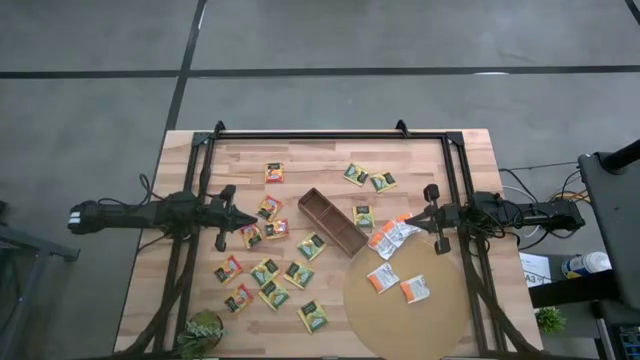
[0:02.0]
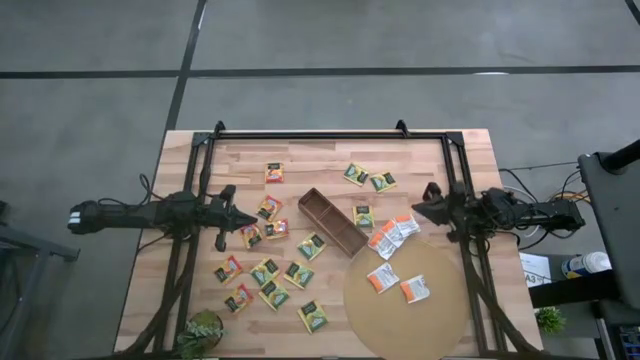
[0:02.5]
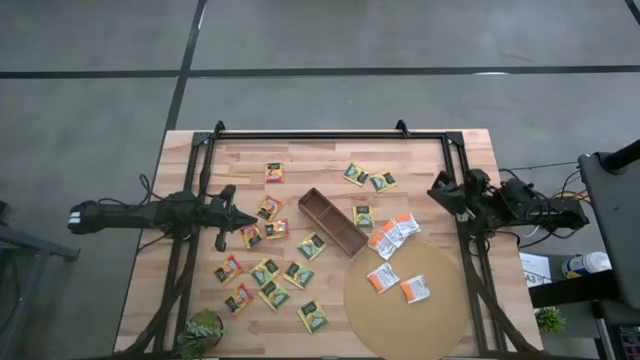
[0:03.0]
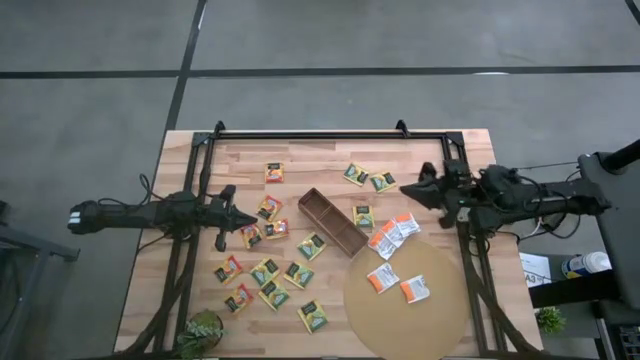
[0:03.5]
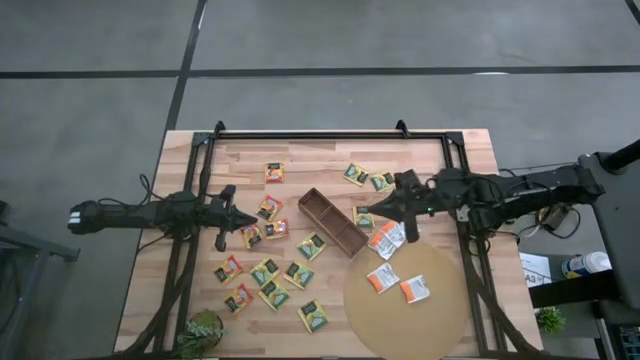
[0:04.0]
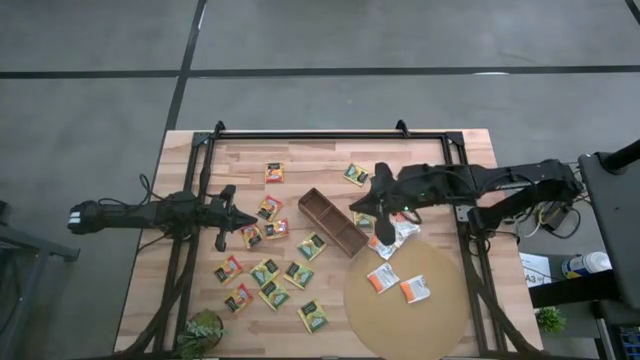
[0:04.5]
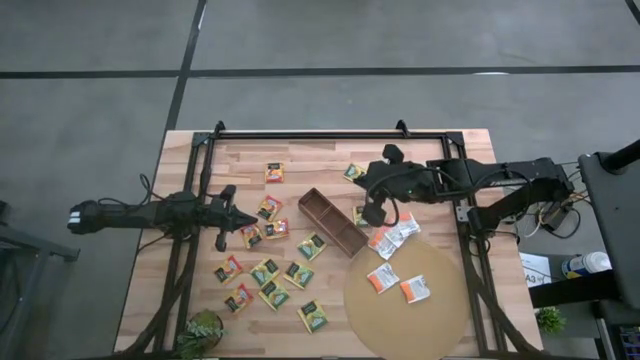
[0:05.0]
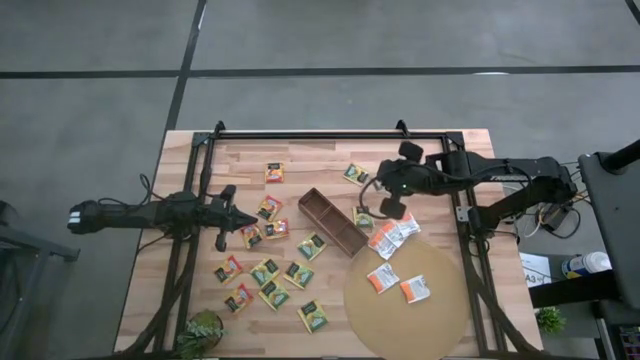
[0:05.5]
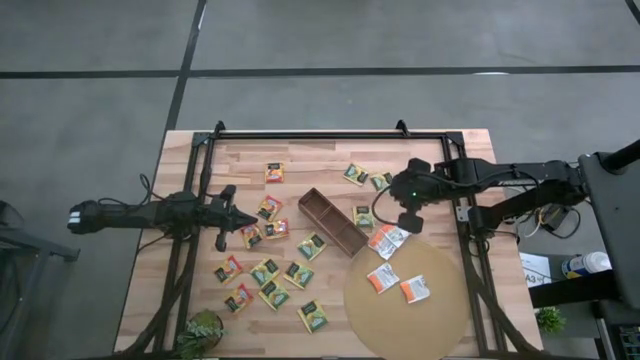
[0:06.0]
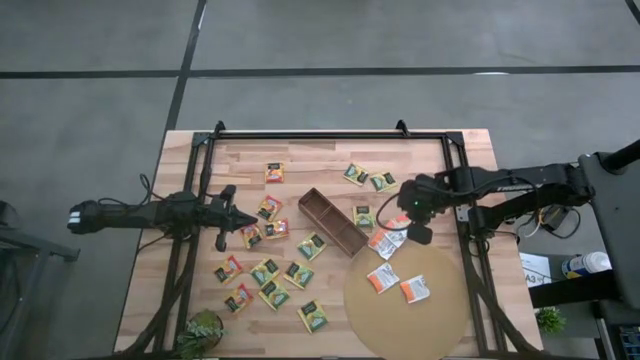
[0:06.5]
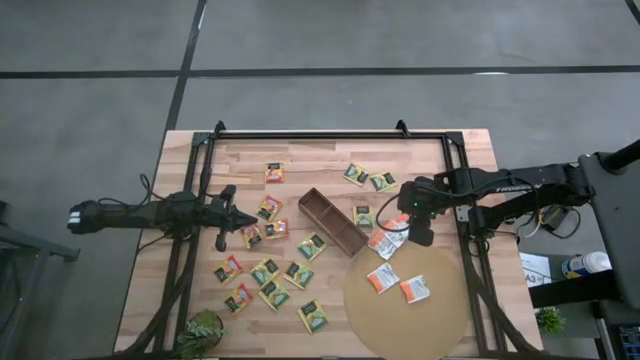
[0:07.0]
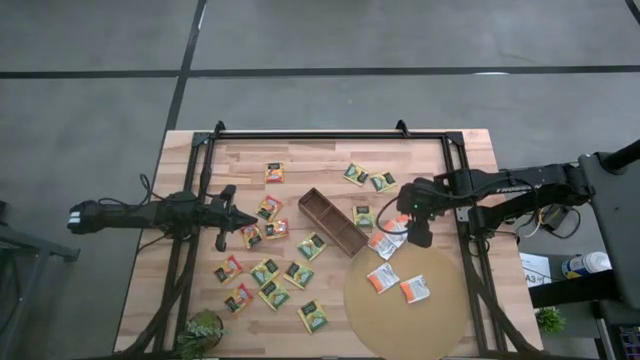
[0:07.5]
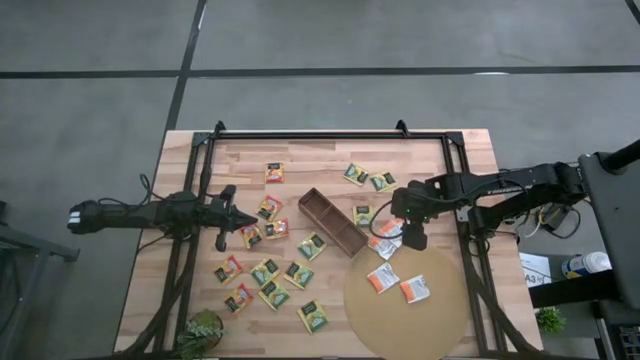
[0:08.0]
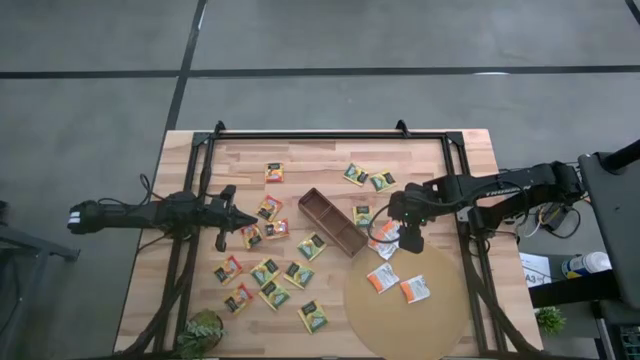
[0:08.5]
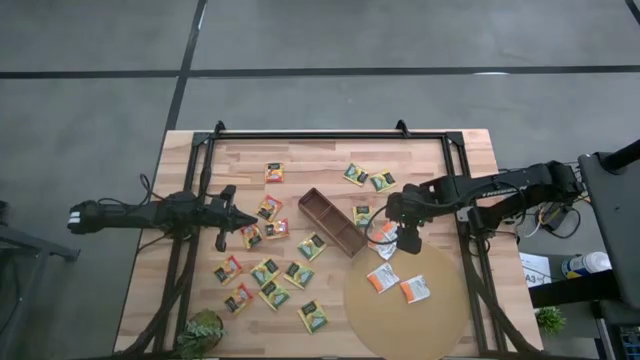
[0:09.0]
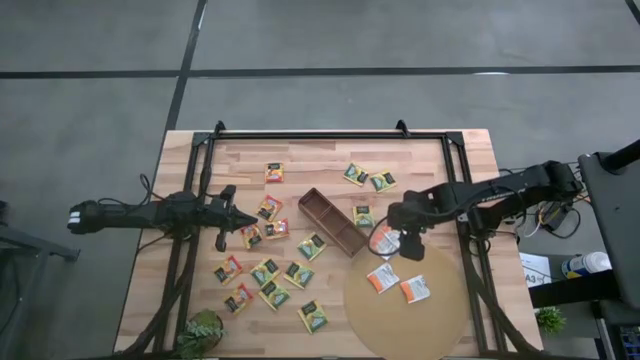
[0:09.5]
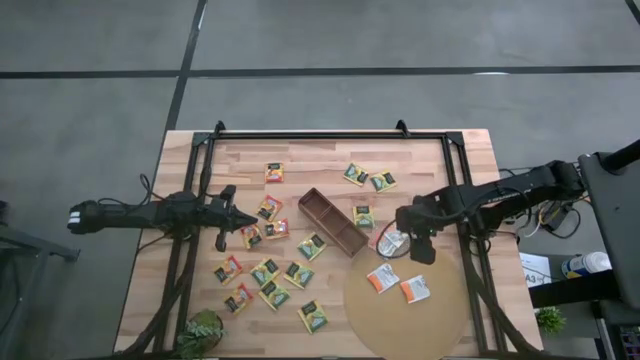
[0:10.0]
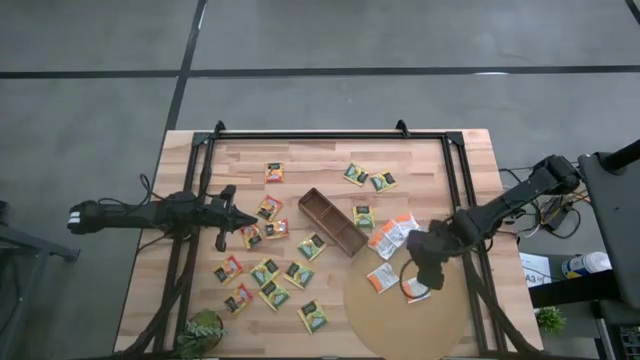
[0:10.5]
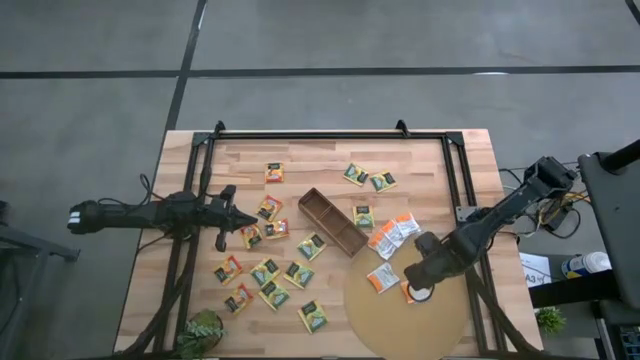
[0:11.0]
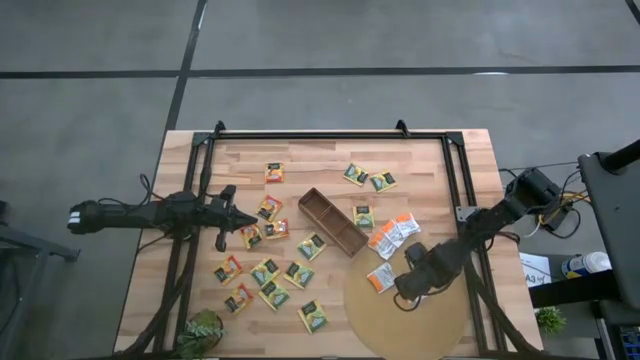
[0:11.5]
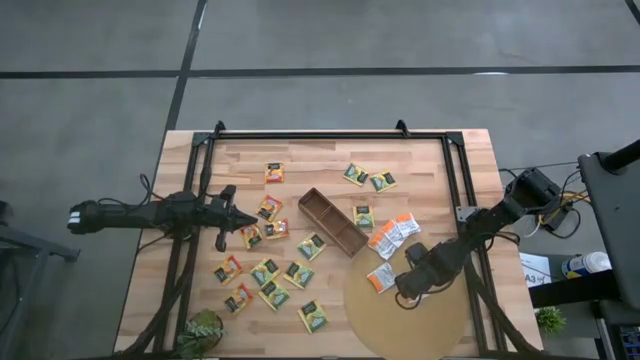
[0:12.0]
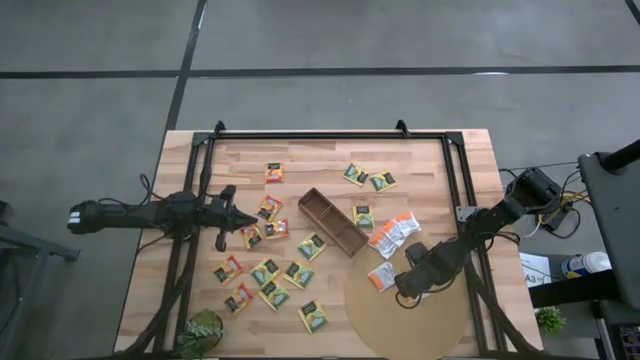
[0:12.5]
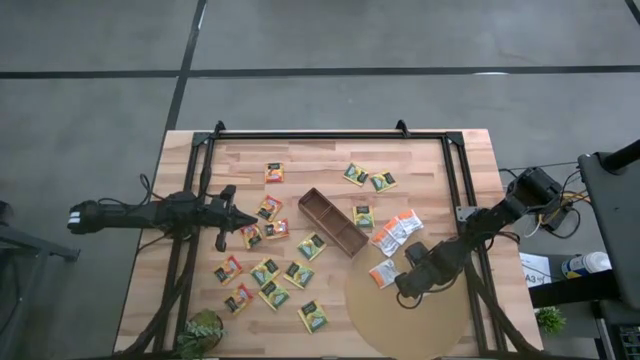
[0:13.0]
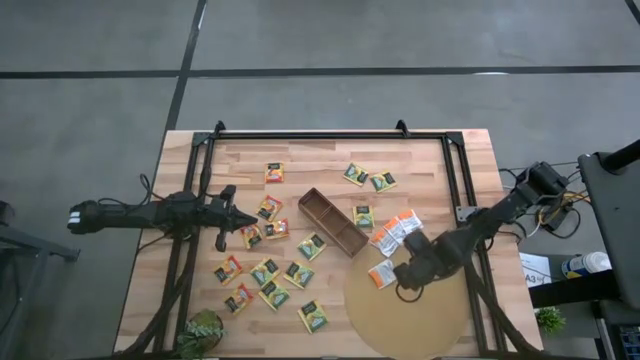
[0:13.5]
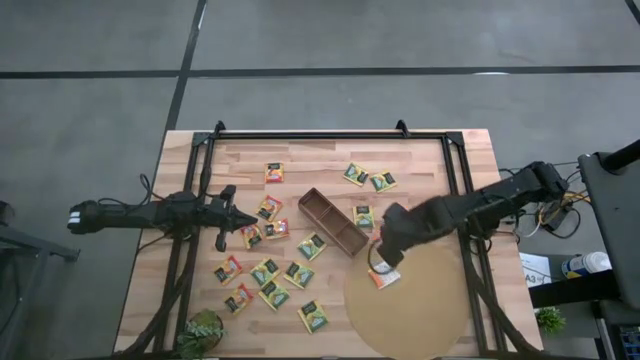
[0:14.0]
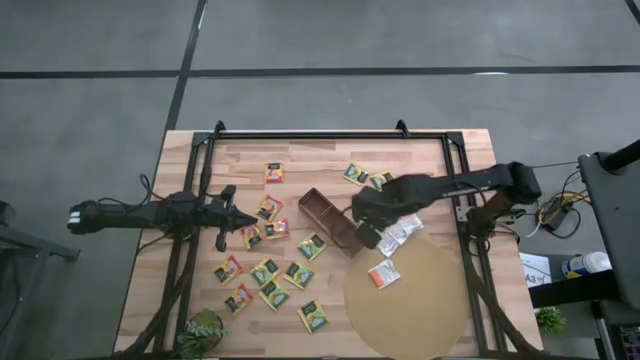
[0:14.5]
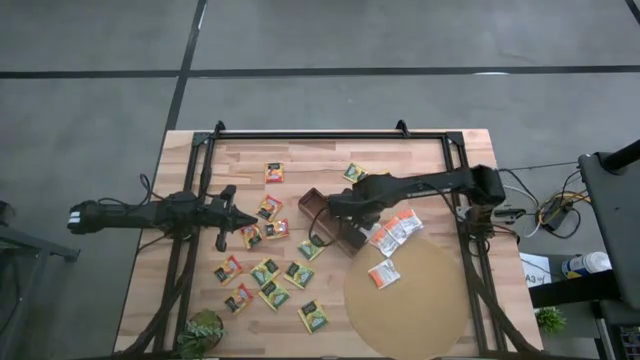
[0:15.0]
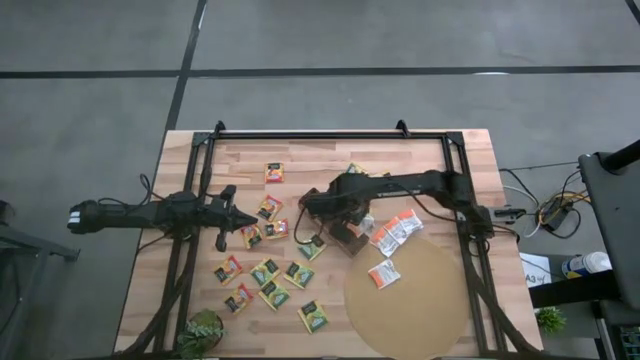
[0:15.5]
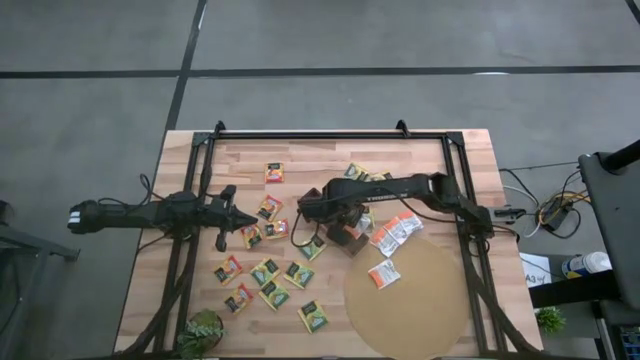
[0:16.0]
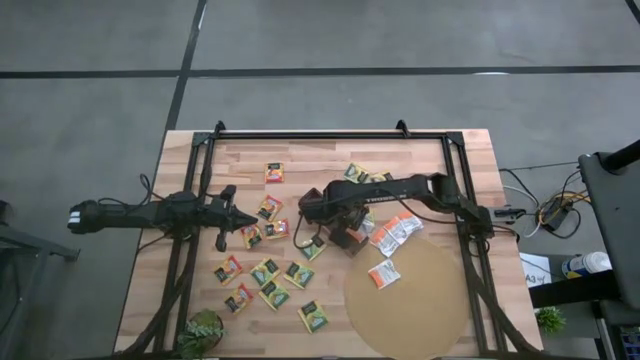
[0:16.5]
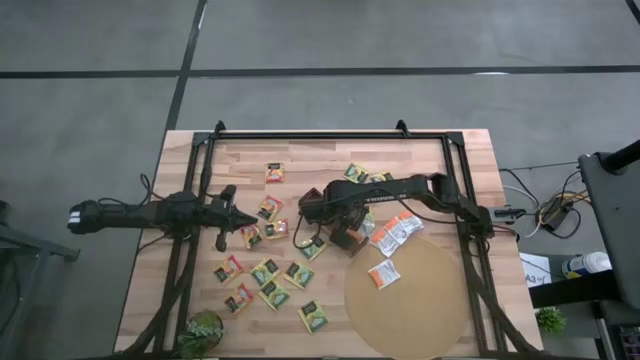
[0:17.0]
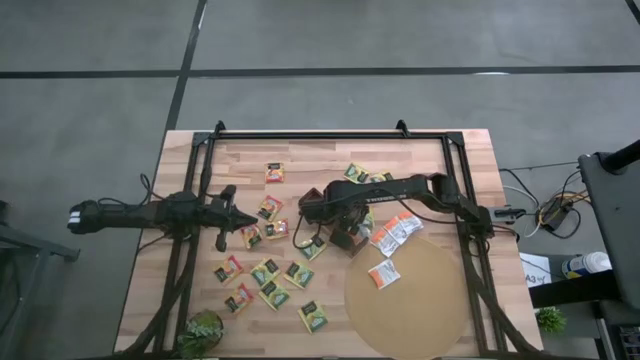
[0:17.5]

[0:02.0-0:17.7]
Task: Pick & Place Tea
Put the white tea bag into the right section of the wooden organizer

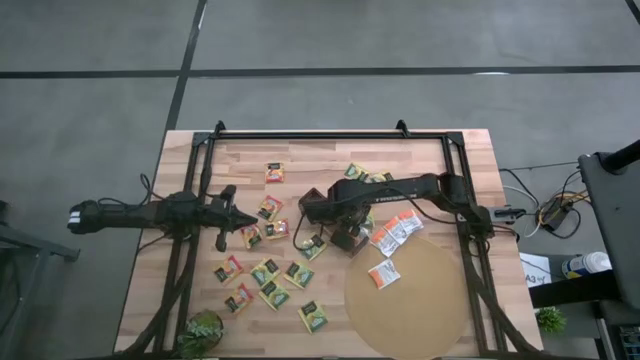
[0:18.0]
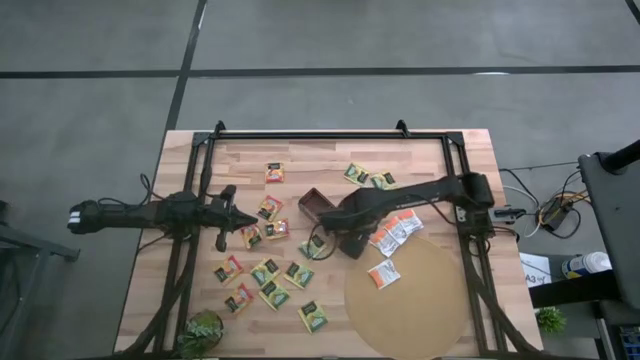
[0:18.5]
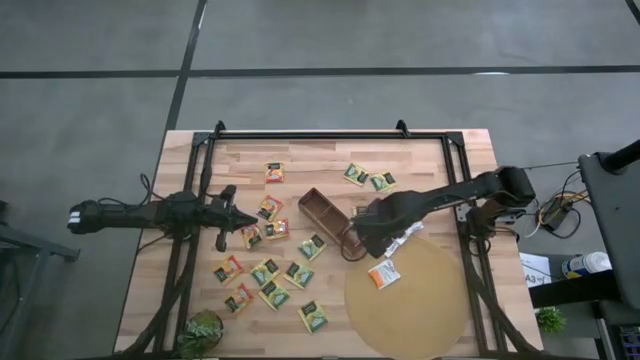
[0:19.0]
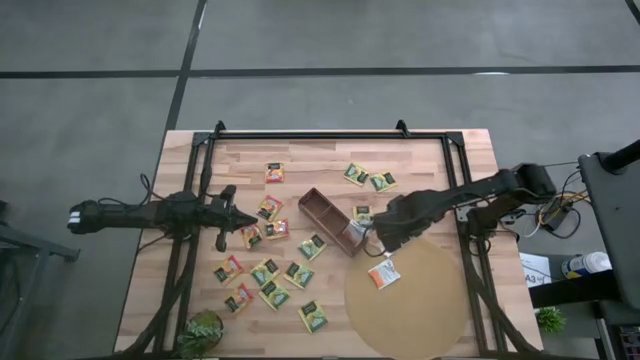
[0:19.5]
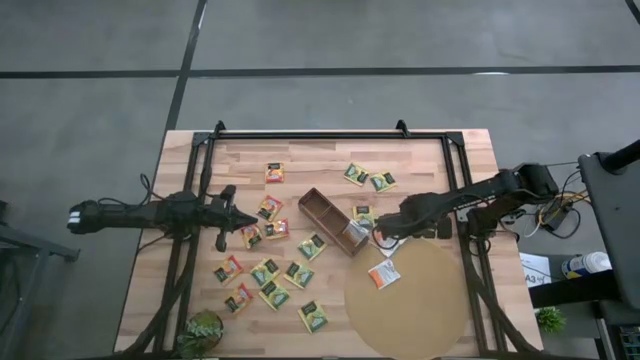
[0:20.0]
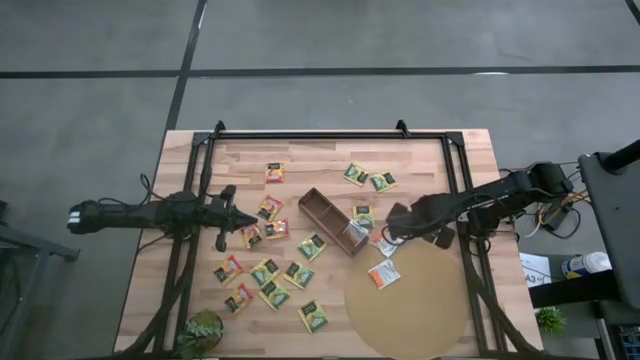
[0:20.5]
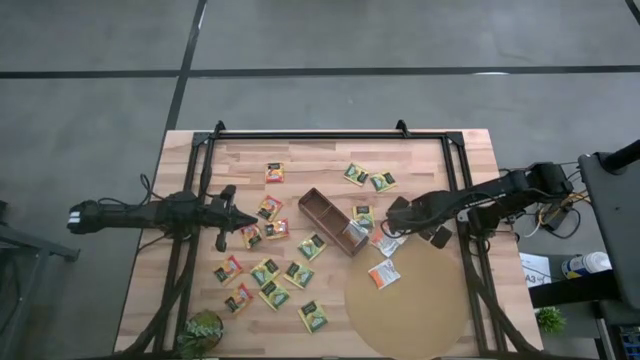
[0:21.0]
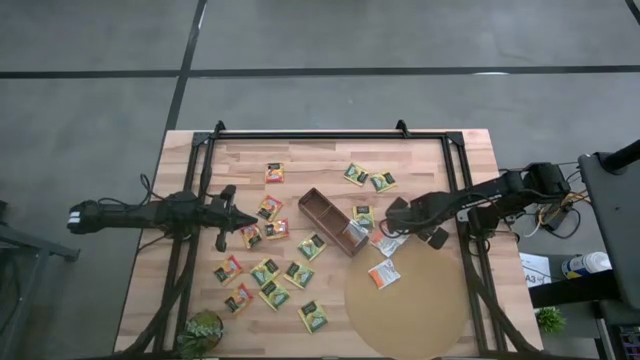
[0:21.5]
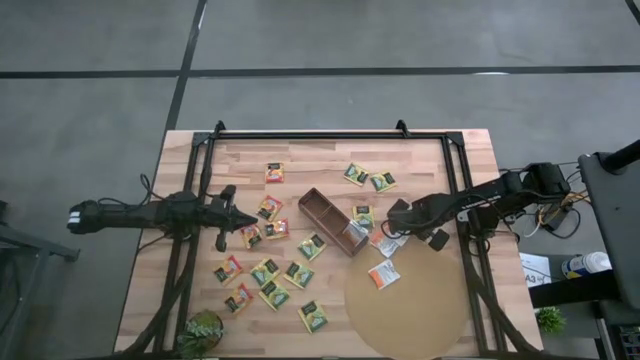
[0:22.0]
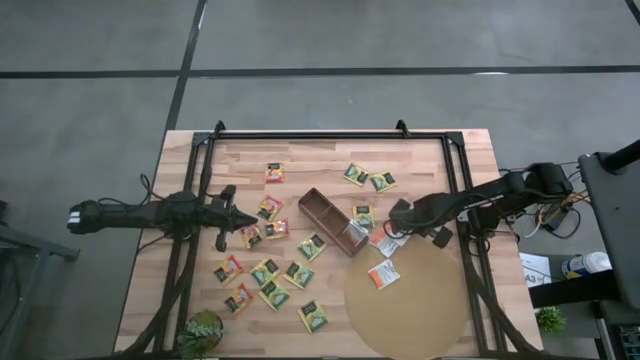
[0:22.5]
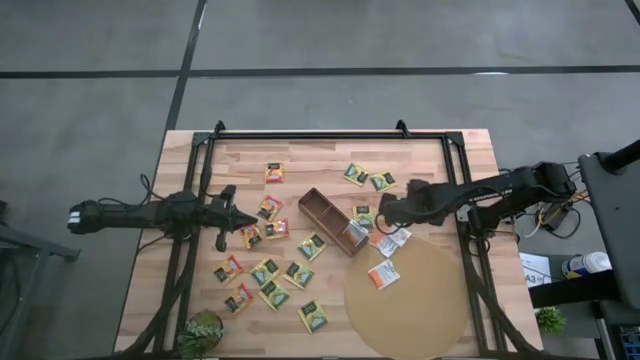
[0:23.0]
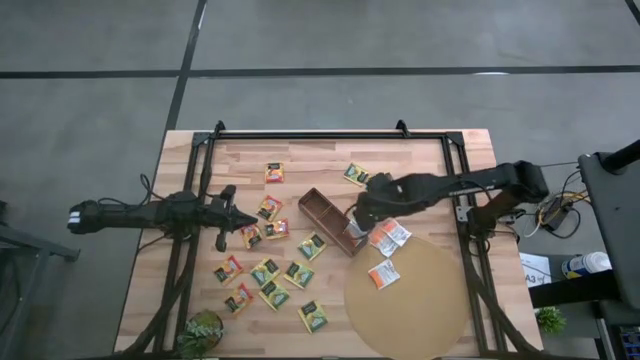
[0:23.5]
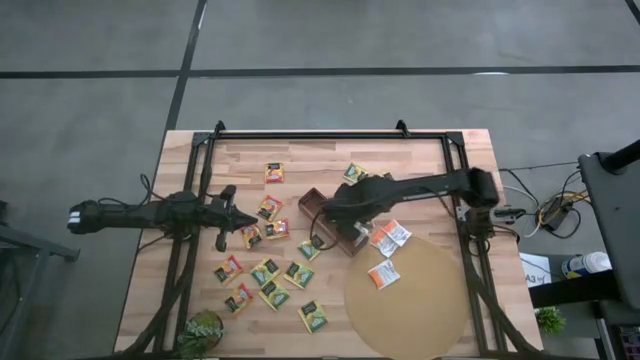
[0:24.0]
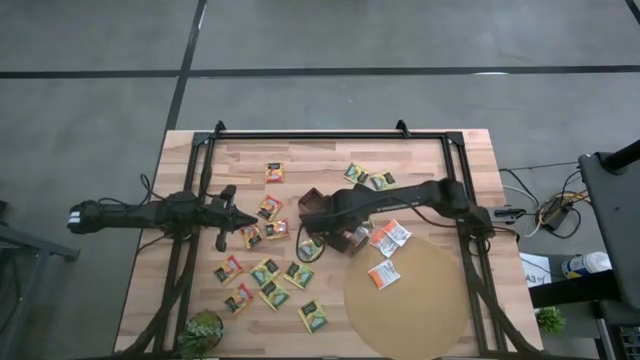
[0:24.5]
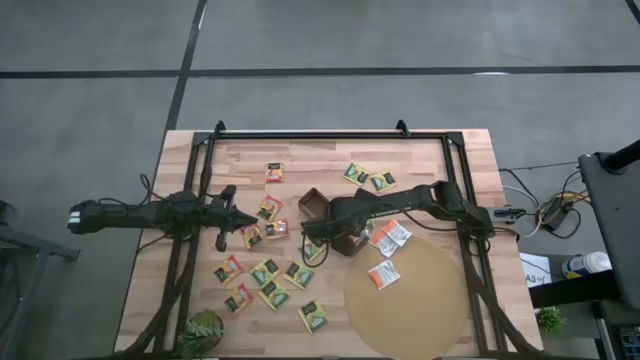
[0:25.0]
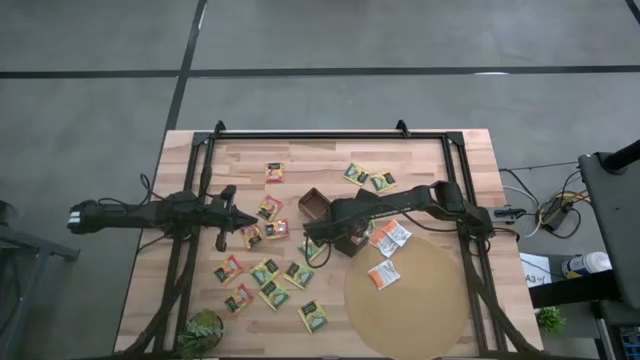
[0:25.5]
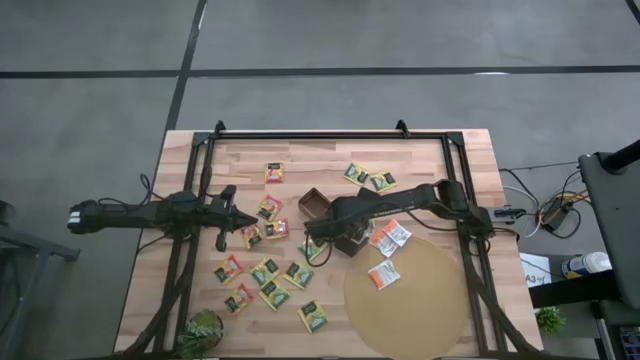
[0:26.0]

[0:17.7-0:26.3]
Put the white tea bag into the right section of the wooden organizer
